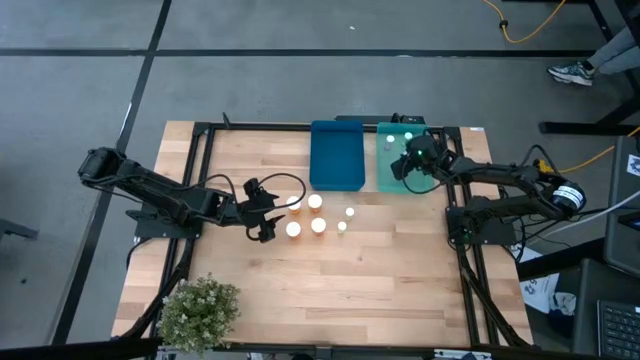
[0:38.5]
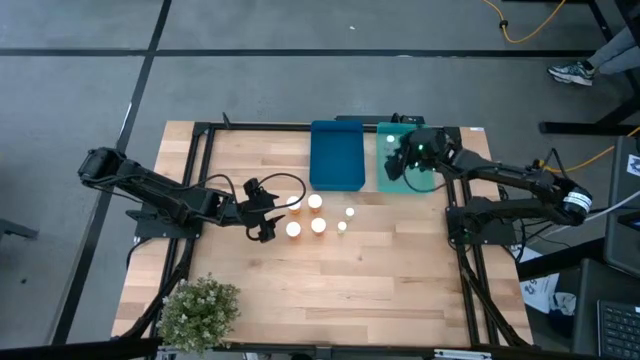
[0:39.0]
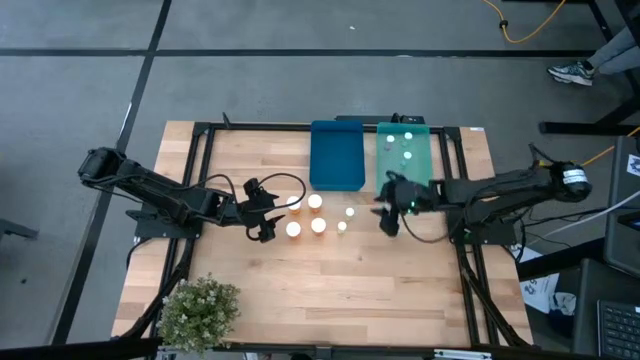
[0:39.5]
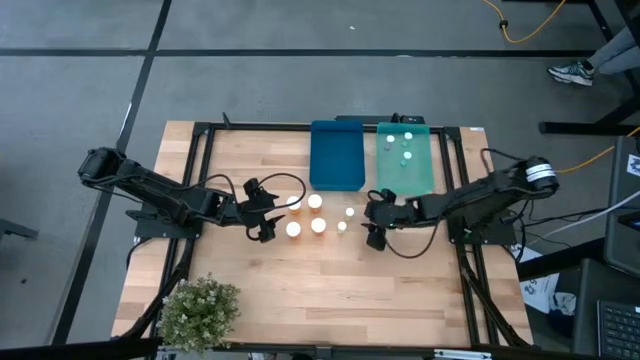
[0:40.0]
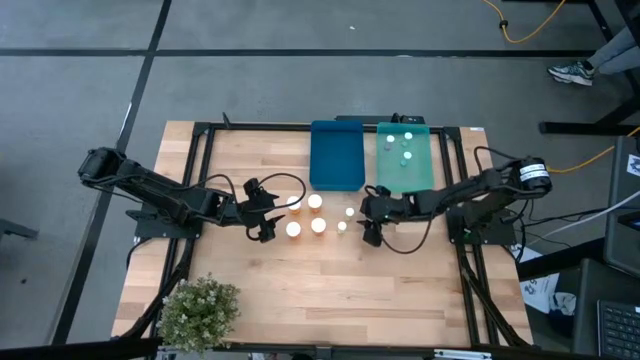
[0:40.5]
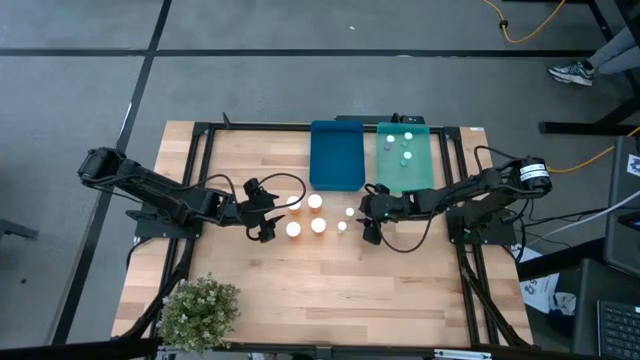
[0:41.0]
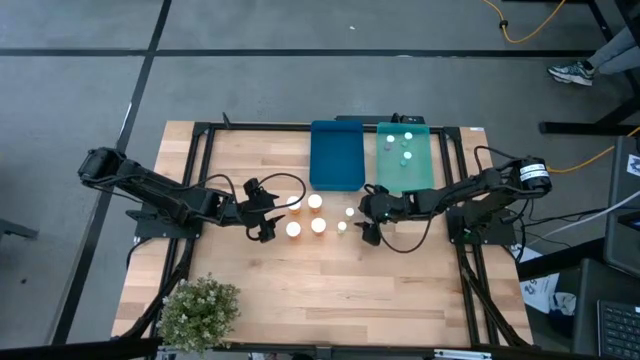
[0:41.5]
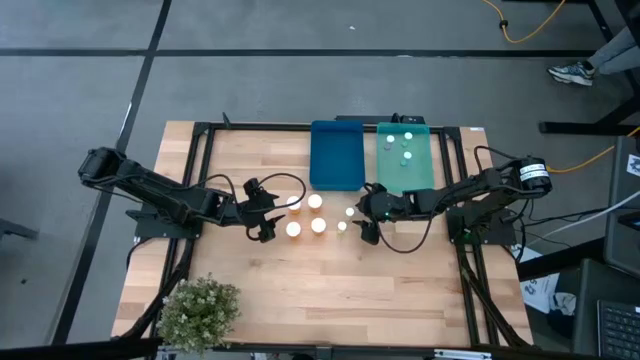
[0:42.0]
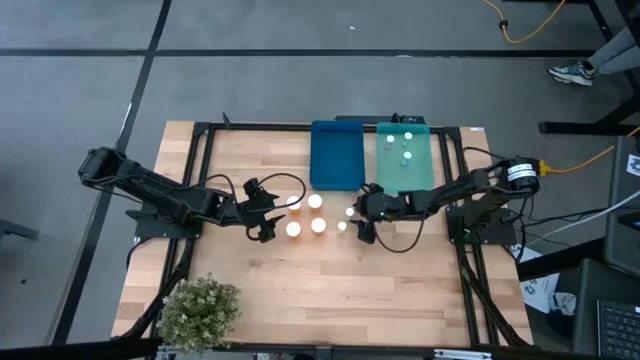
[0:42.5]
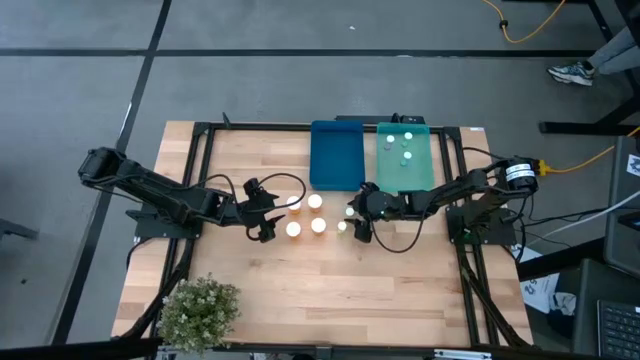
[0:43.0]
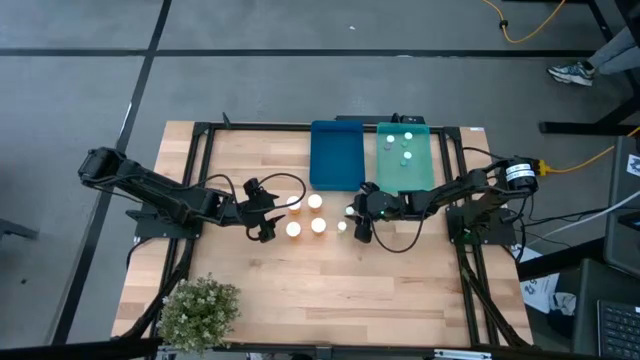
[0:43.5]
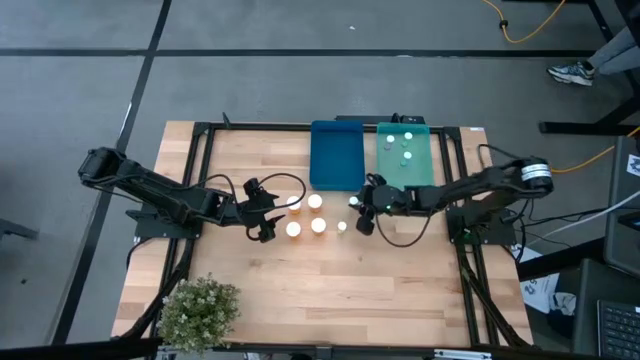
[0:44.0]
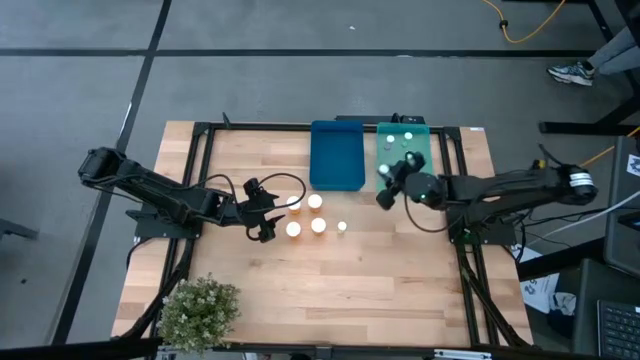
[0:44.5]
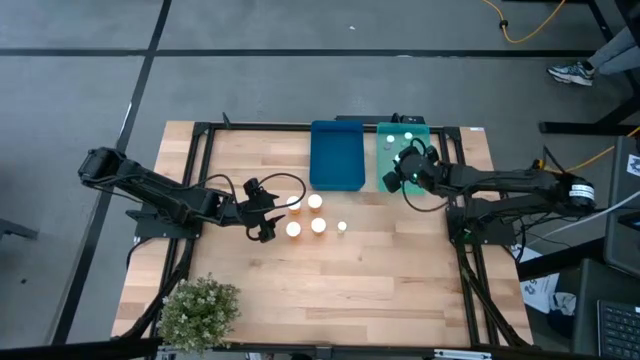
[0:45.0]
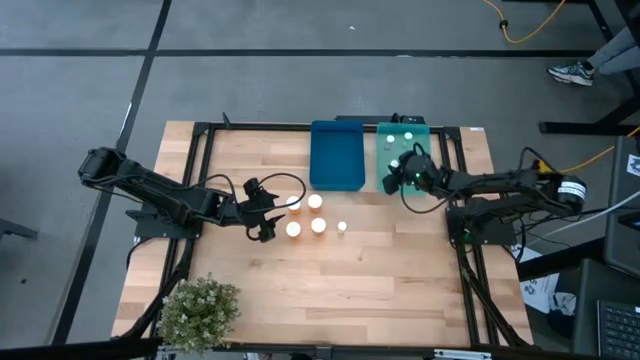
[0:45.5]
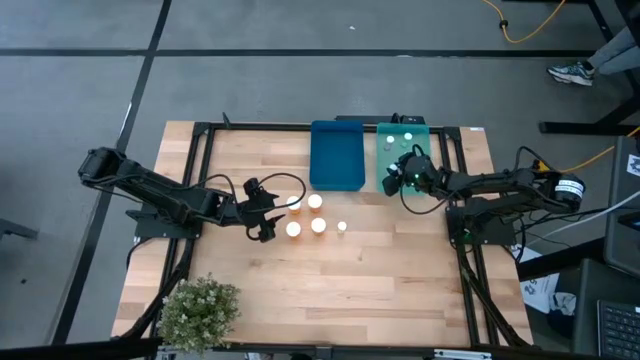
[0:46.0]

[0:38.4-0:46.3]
Task: Pick and place medicine bottles into bin by pill shape (circle, oval)
Put the yellow pill bottle into the green transparent bin

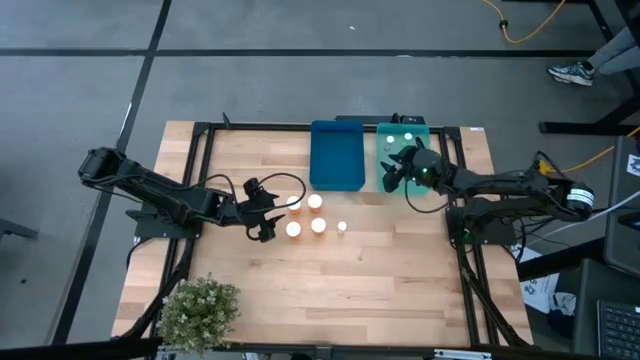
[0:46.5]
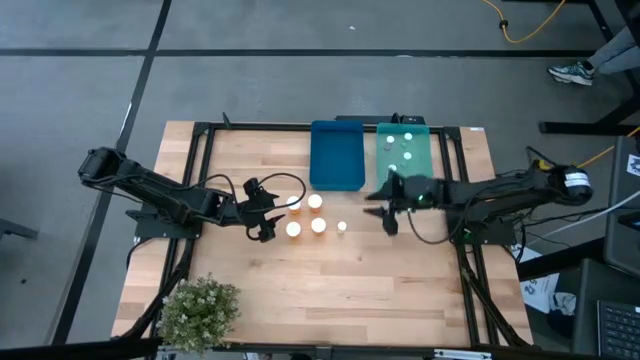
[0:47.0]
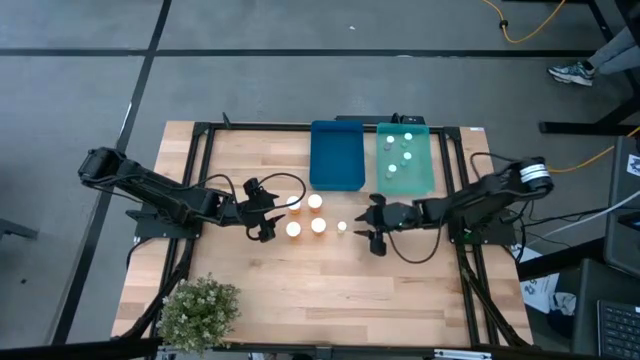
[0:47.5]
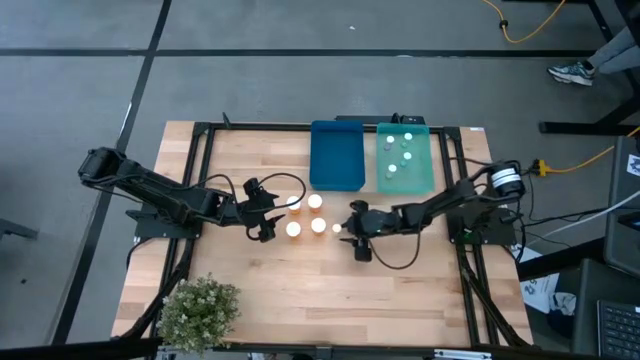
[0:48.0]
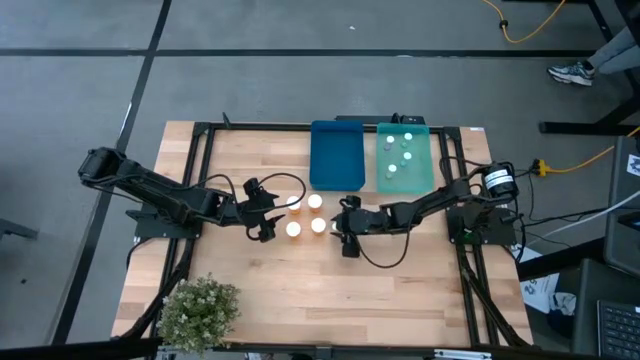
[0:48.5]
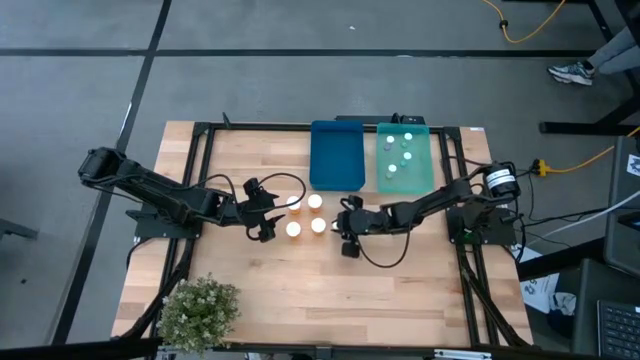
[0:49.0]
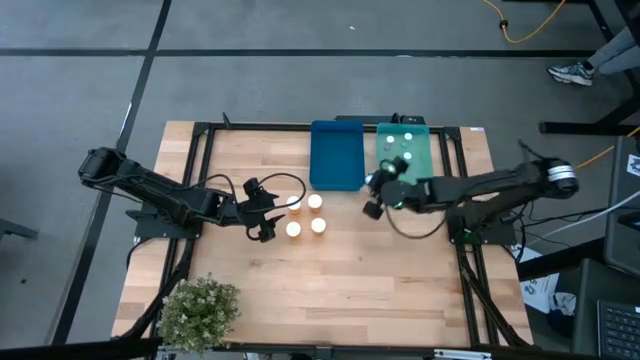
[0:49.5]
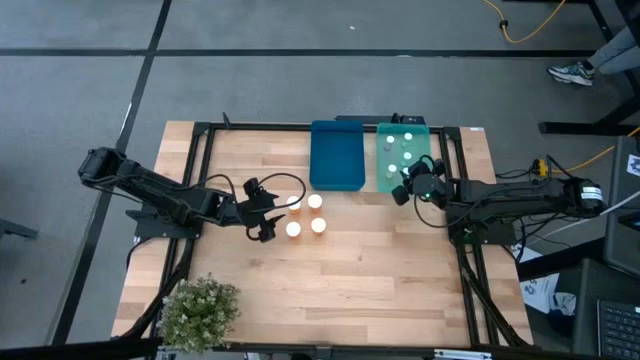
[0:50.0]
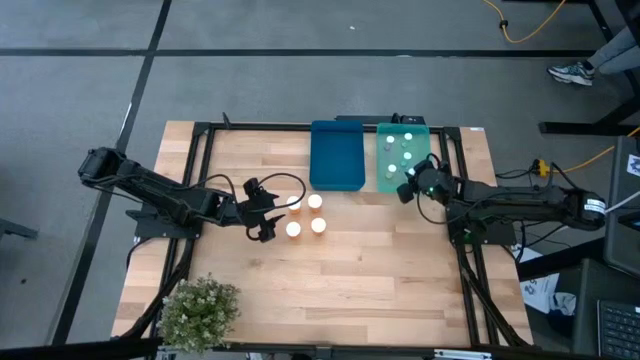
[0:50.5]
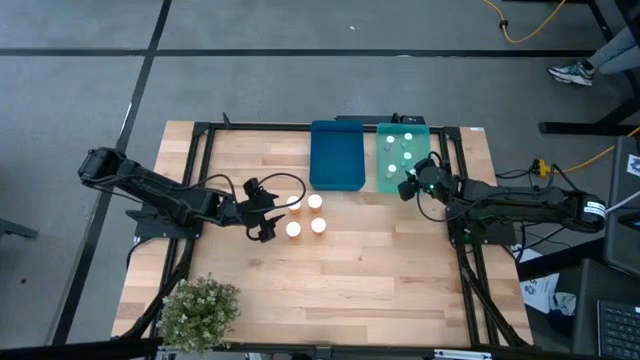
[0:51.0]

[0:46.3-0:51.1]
Put the yellow pill bottle into the green transparent bin

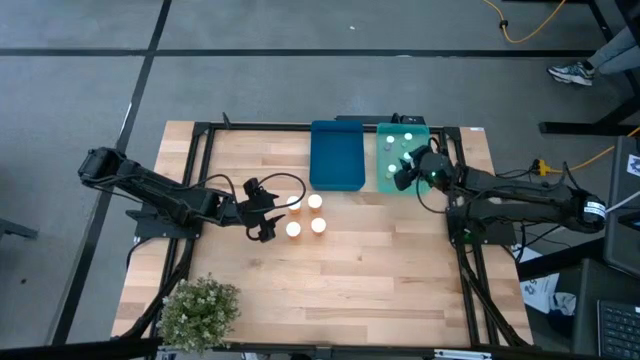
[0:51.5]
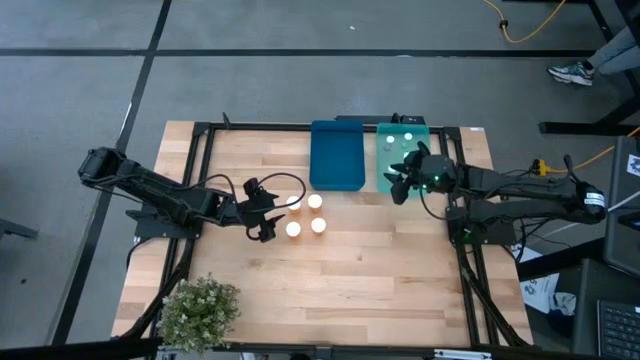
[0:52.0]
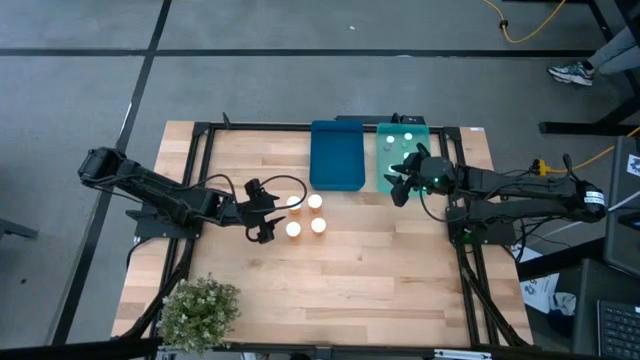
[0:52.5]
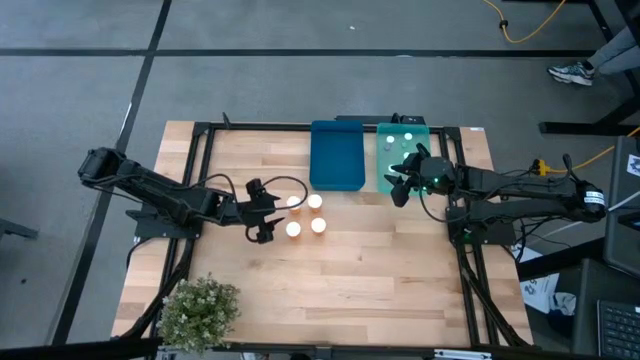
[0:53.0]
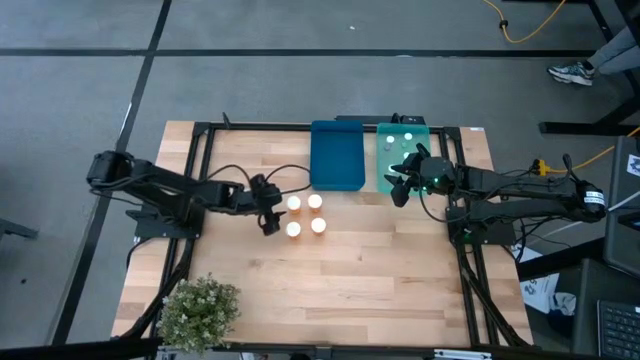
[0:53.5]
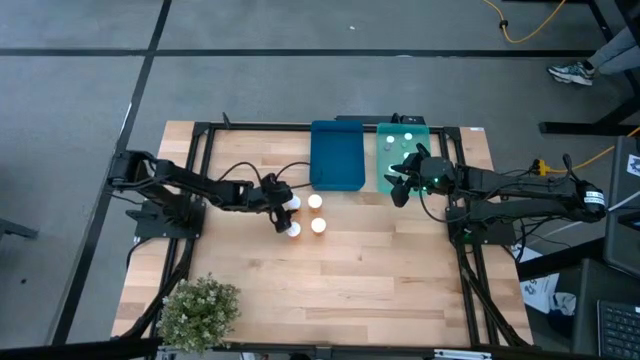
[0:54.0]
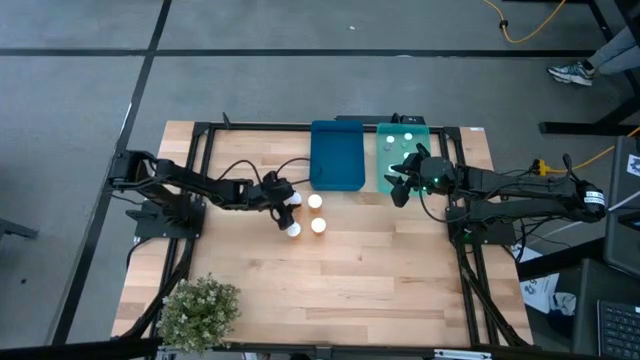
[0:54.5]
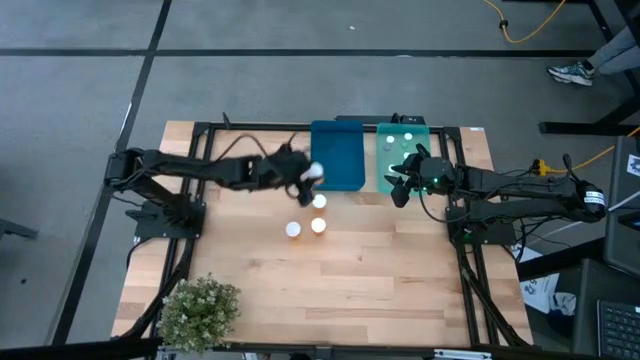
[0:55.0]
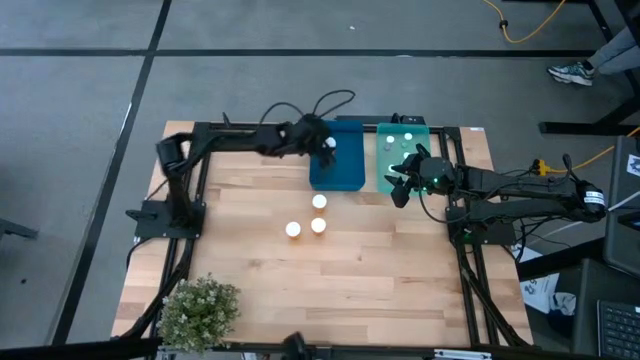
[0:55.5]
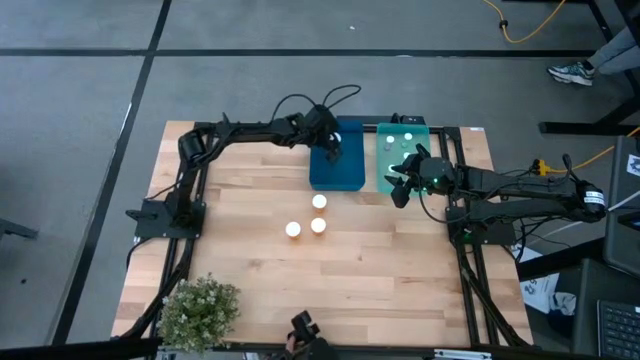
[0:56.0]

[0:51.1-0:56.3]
Put the orange pill bottle into the blue bin

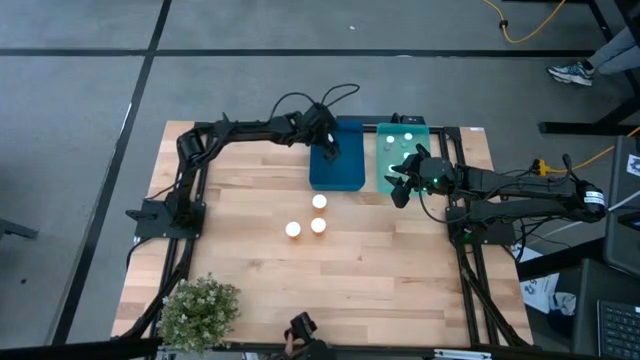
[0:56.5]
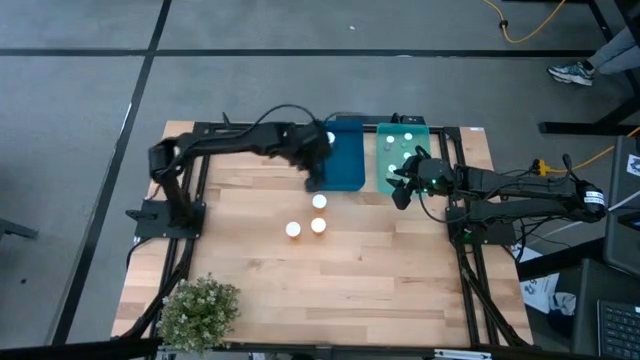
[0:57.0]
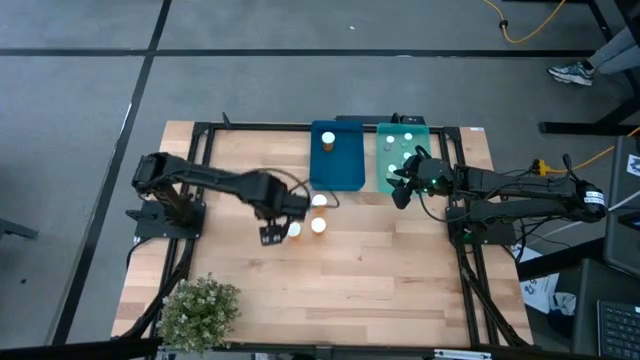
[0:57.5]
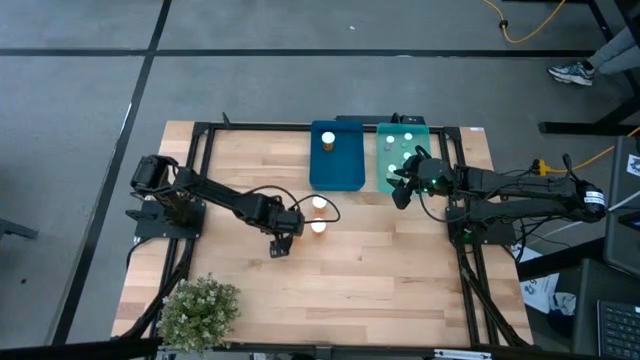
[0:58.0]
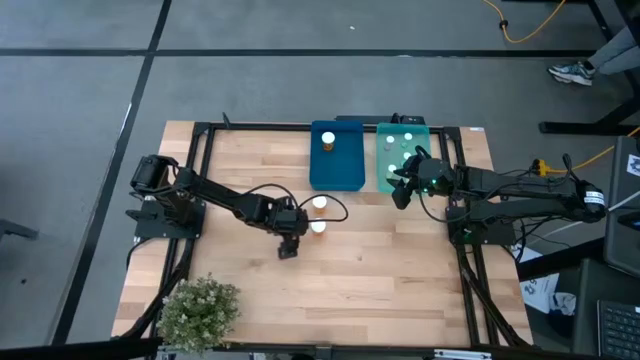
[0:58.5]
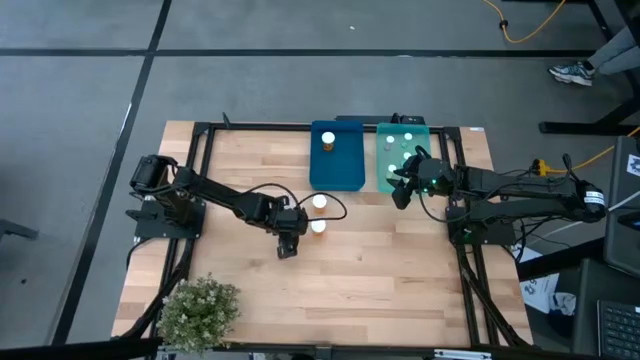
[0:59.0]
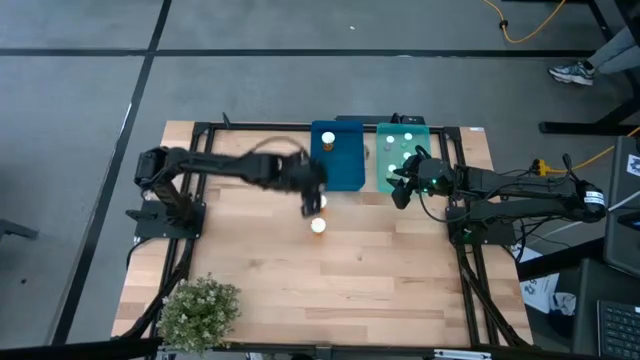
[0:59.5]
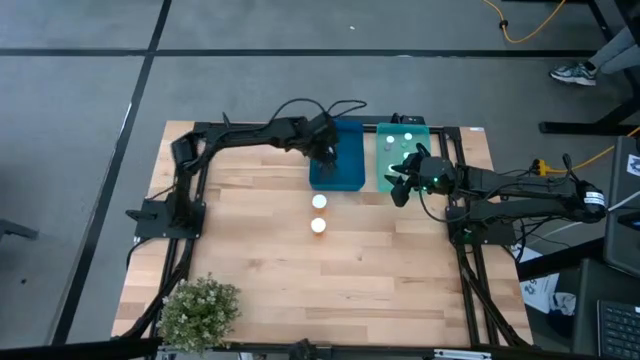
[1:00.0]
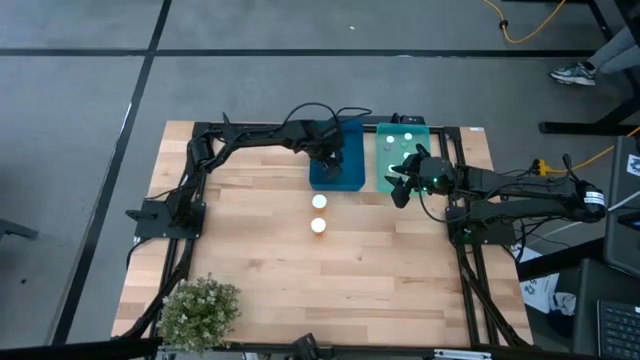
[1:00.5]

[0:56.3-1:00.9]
Put the orange pill bottle into the blue bin
